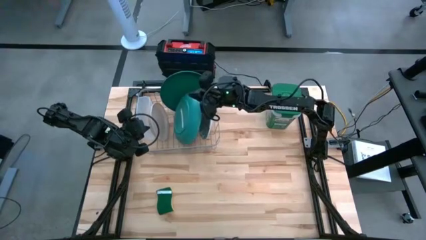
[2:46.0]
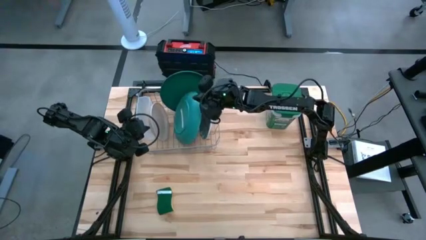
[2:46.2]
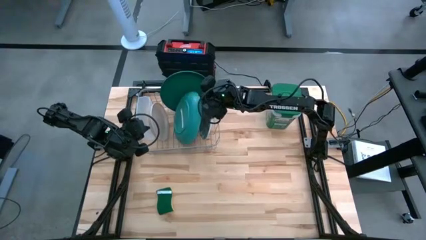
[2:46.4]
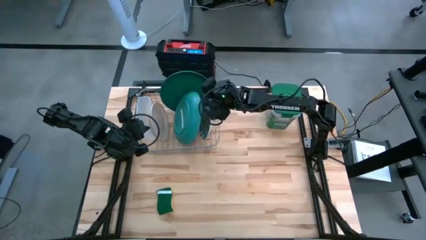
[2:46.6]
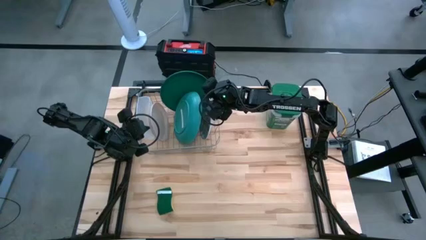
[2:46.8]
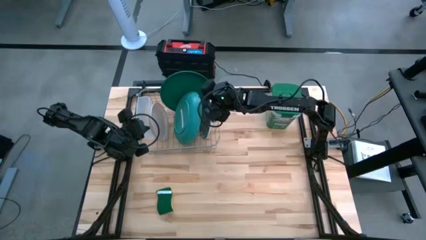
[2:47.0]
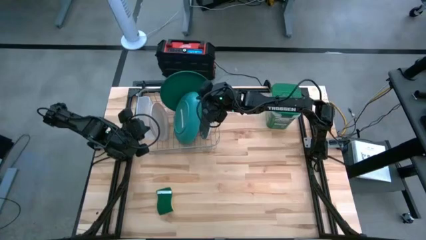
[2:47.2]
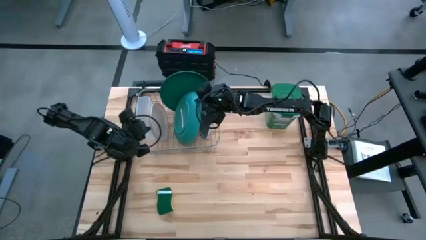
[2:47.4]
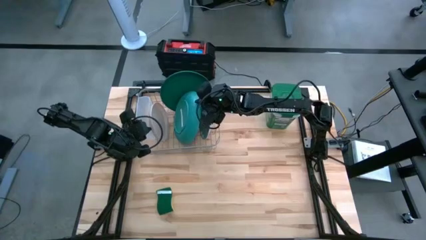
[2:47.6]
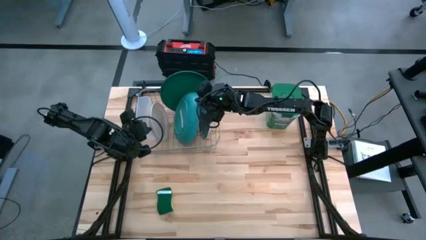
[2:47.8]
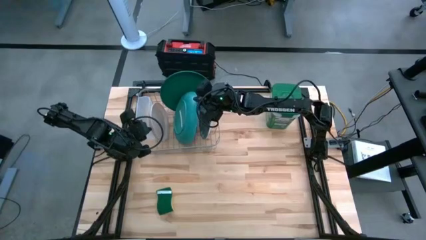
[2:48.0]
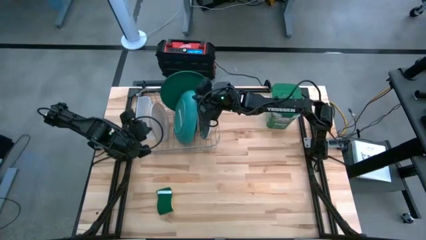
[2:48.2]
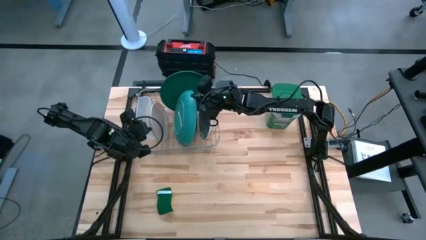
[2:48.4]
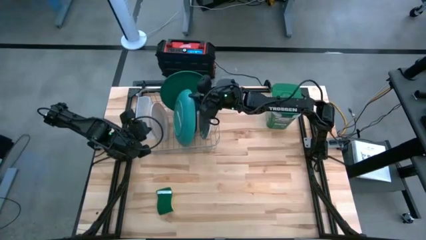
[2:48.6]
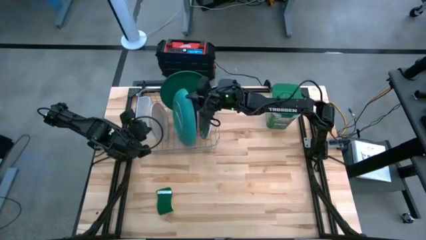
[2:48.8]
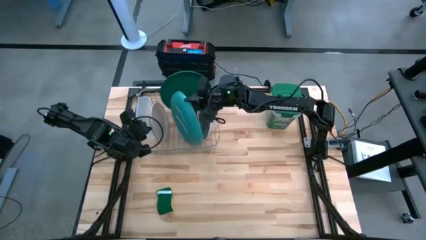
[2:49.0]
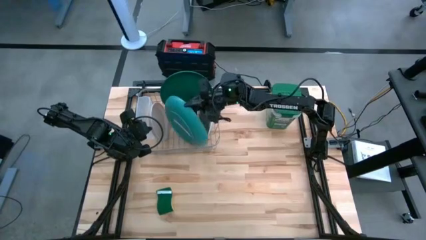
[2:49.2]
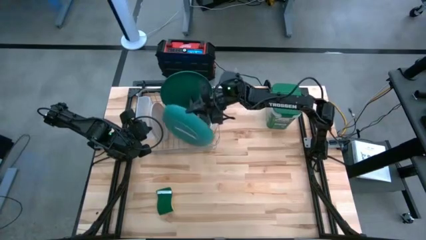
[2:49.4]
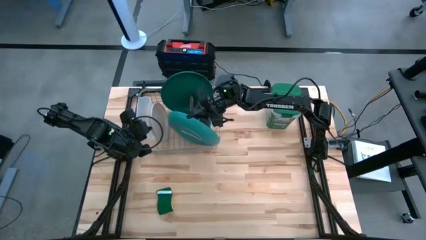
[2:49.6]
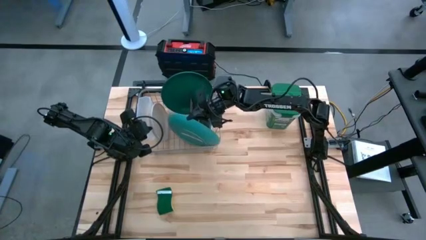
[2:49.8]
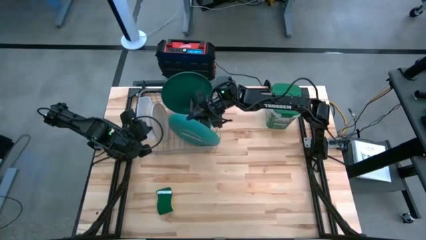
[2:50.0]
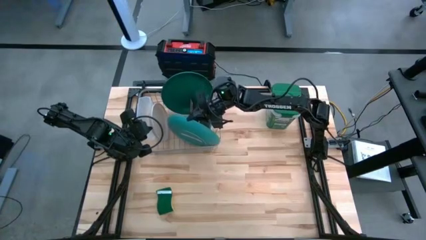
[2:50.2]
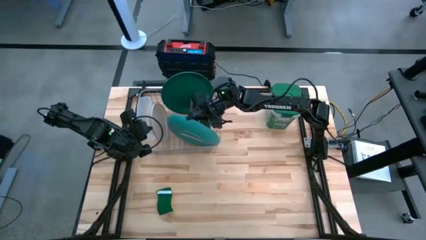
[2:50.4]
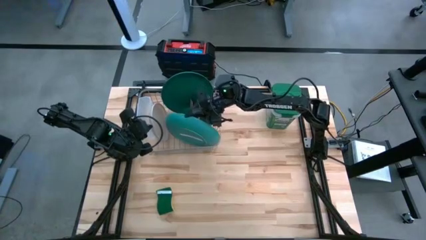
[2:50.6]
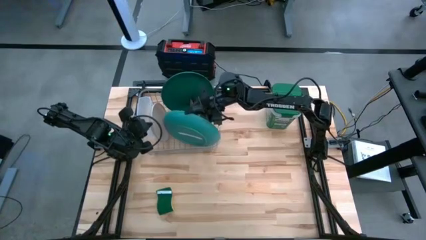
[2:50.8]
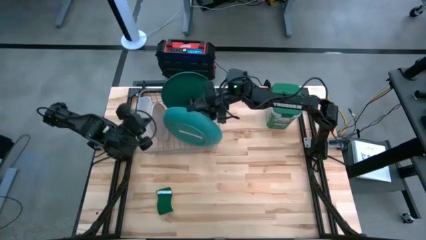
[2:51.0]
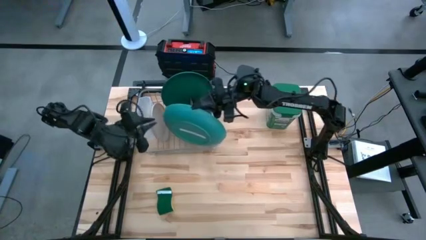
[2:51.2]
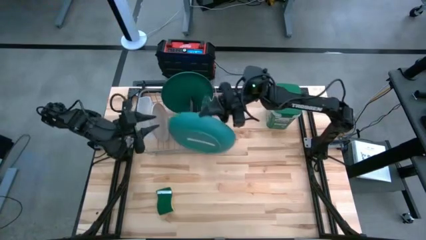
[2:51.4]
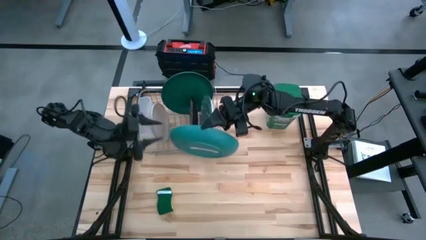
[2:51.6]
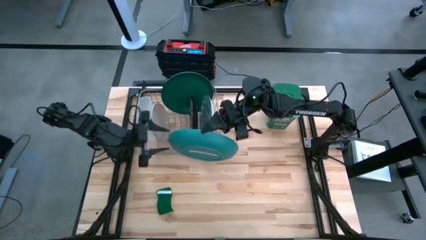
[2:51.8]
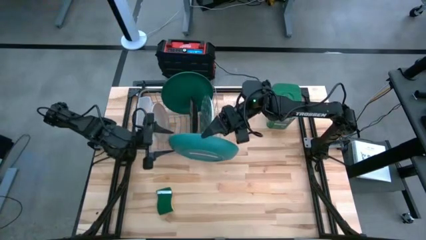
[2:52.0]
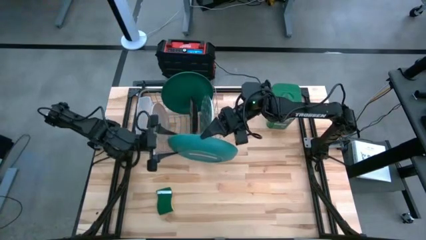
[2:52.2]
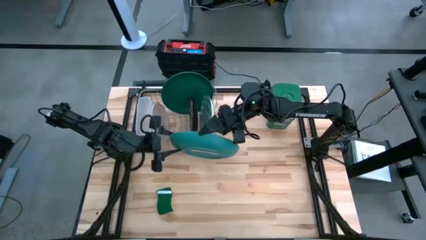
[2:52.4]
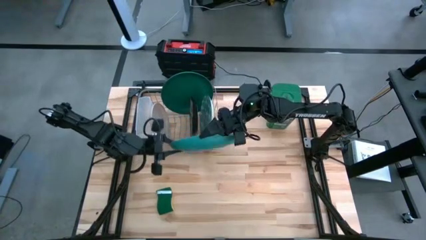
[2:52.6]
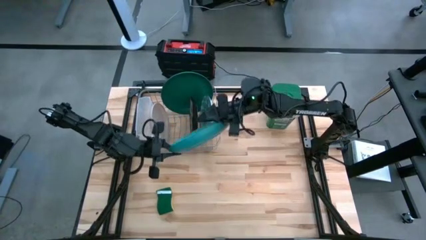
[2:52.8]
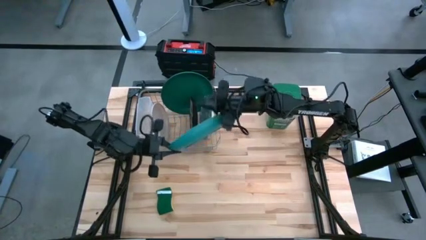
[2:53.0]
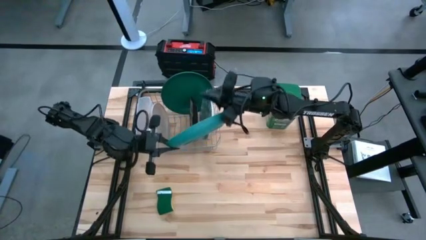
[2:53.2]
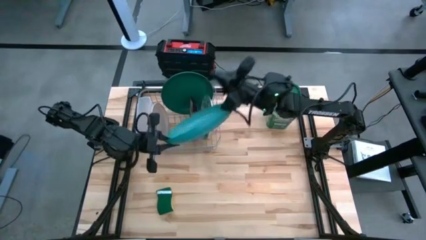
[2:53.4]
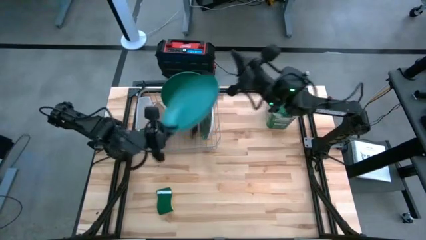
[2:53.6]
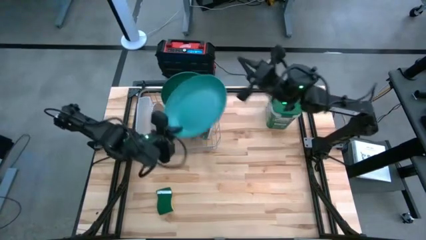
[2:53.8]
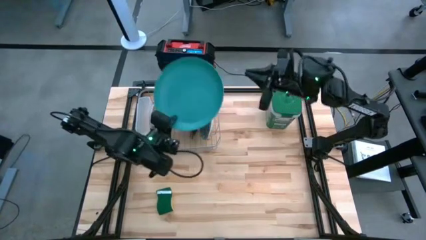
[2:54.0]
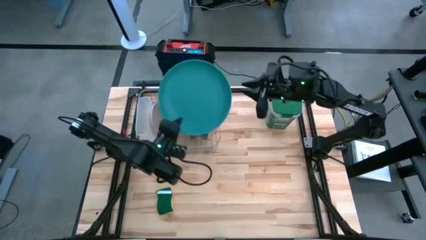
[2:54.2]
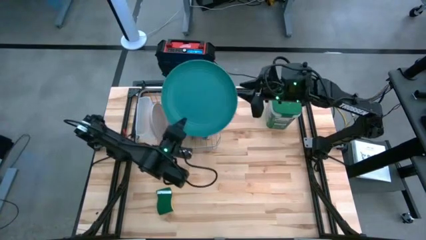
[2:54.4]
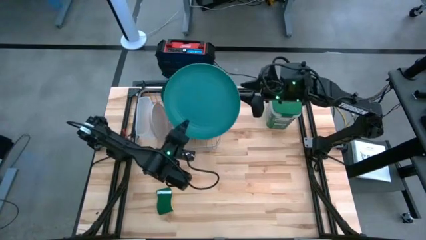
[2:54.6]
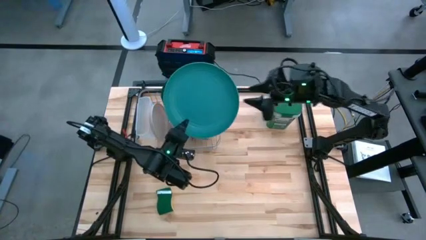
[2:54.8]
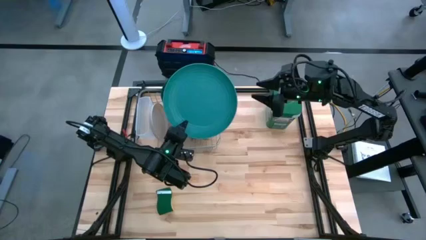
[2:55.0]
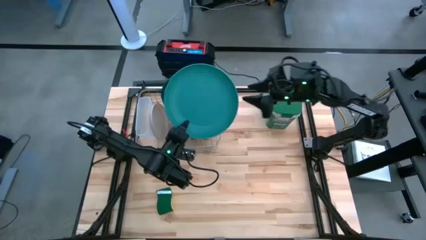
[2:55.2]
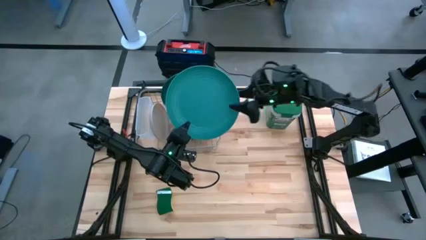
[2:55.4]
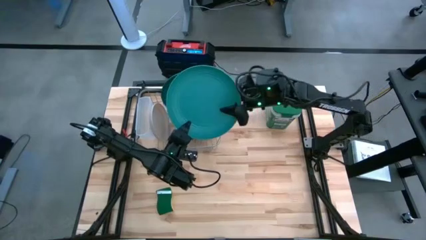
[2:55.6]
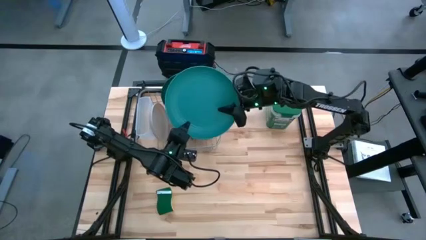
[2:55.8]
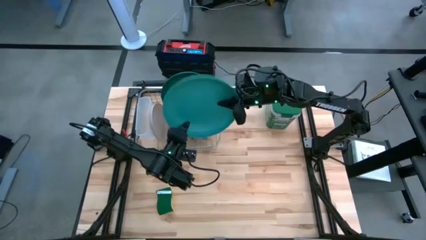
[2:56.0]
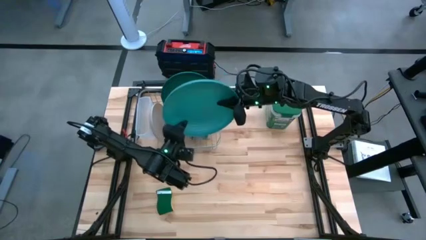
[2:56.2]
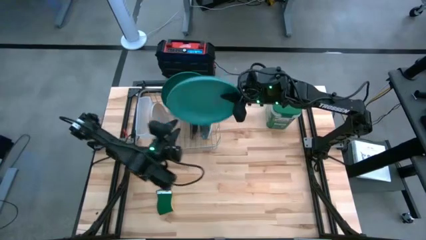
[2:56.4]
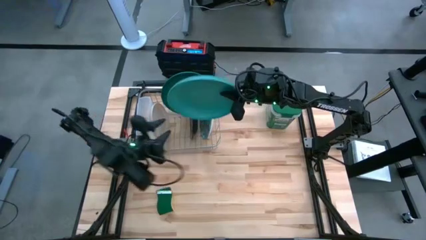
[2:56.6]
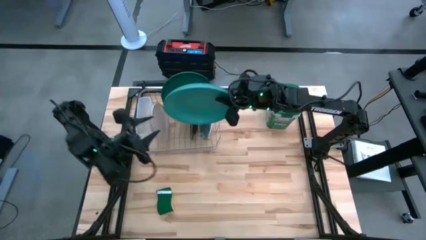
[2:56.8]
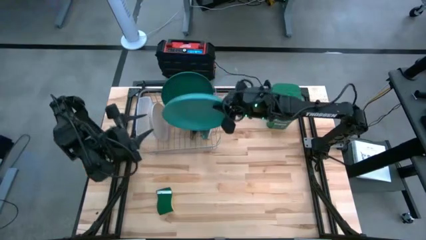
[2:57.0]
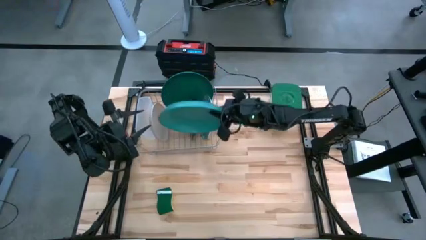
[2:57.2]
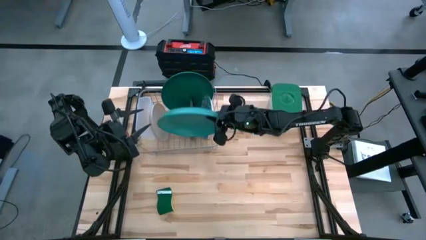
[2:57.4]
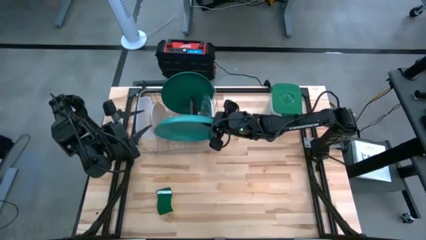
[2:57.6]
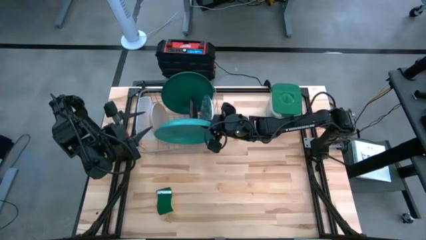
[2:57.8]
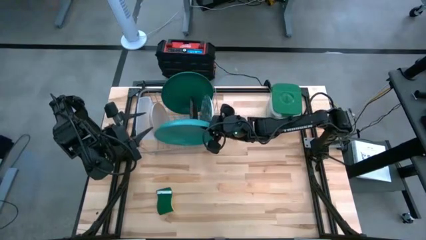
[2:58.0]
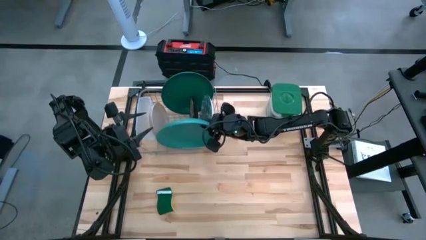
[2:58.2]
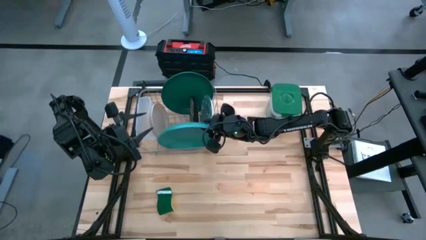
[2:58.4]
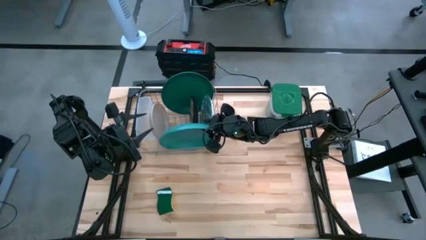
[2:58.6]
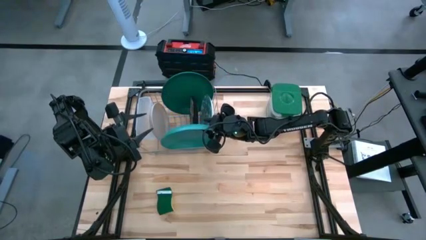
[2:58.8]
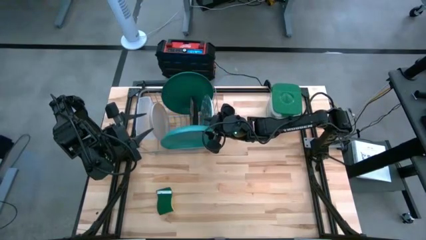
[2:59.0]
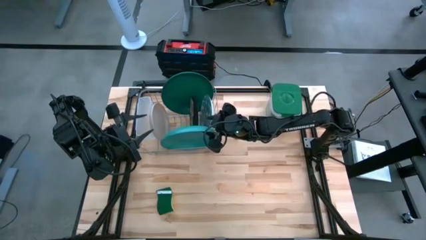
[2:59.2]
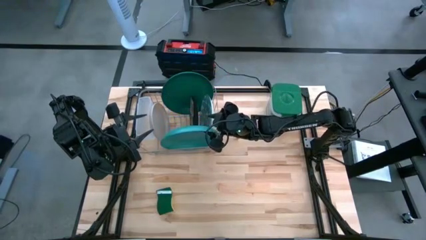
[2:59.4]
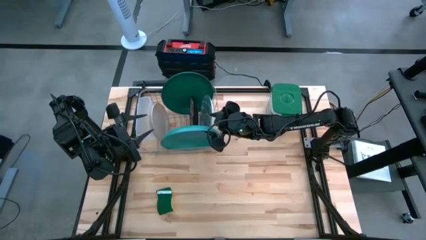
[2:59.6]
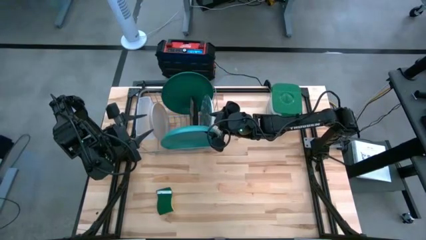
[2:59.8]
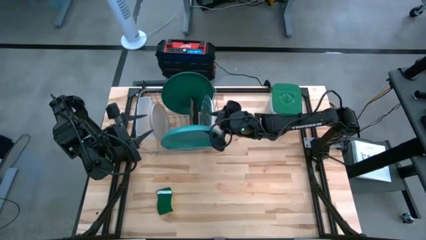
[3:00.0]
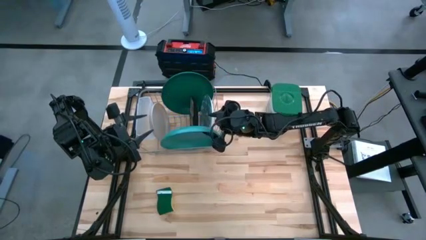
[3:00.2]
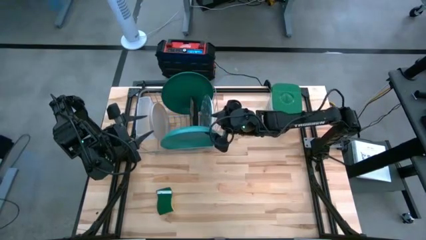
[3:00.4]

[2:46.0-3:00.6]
Task: Sort dishes
Put the light blue plate on the dish rack

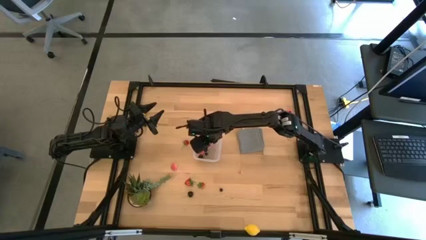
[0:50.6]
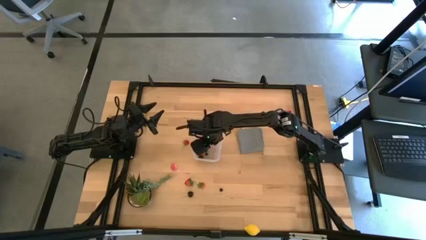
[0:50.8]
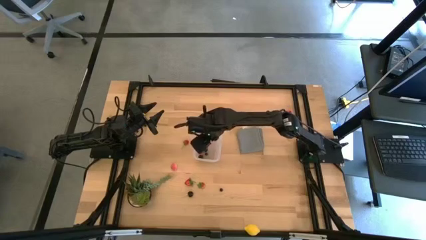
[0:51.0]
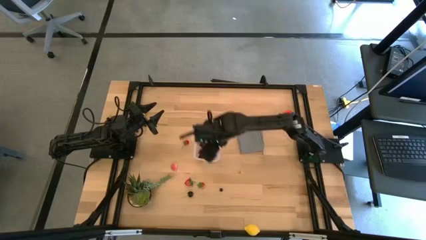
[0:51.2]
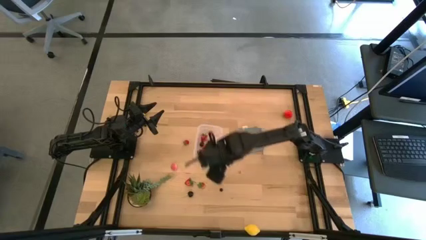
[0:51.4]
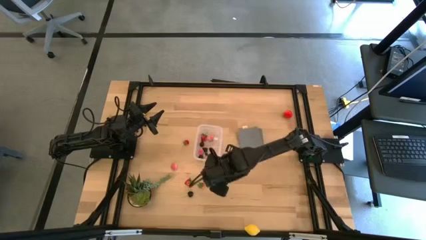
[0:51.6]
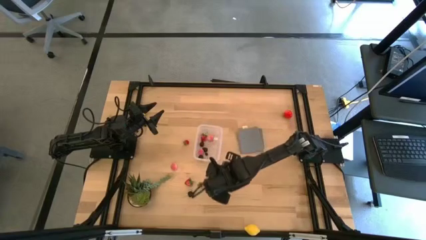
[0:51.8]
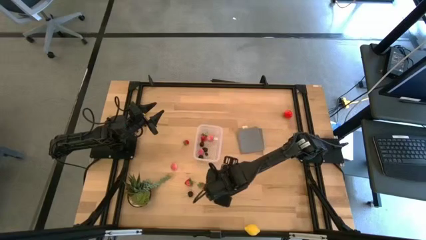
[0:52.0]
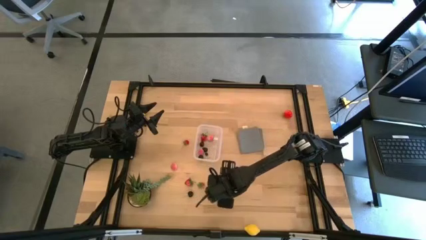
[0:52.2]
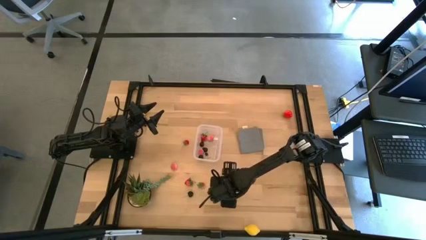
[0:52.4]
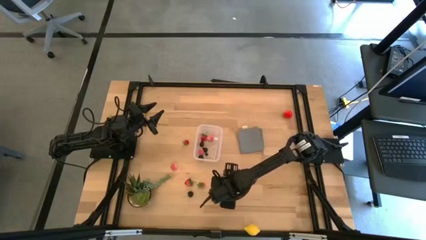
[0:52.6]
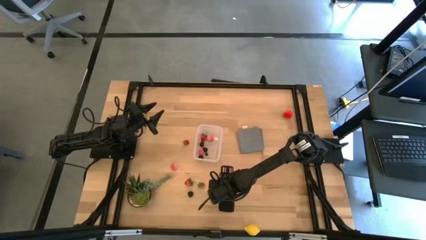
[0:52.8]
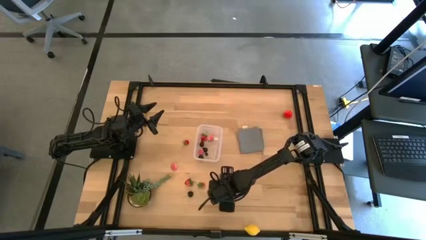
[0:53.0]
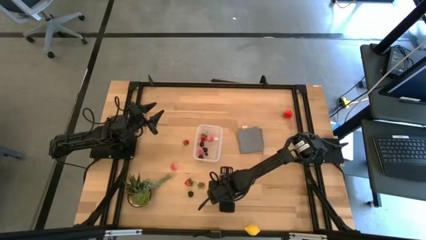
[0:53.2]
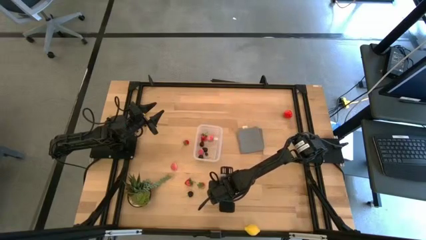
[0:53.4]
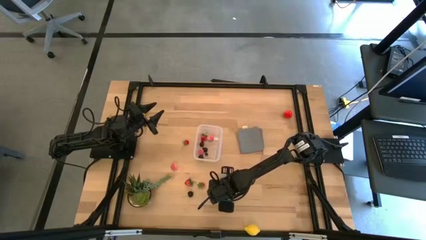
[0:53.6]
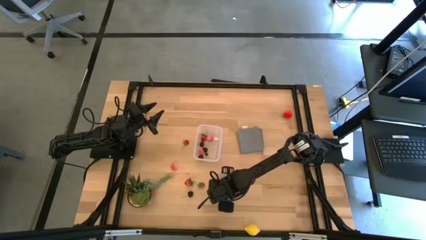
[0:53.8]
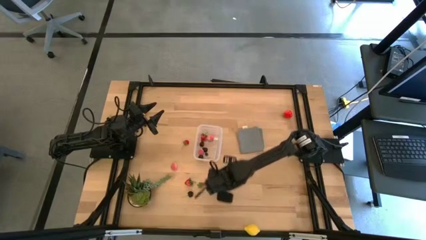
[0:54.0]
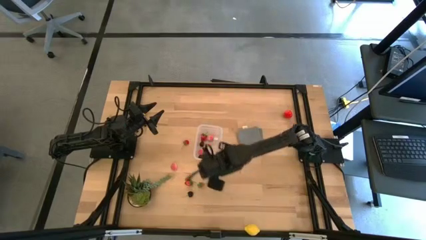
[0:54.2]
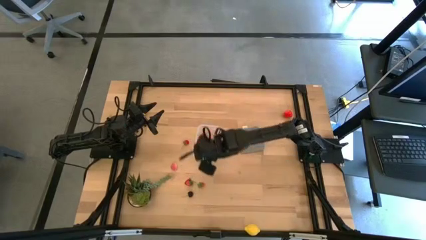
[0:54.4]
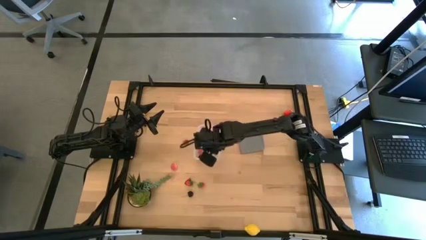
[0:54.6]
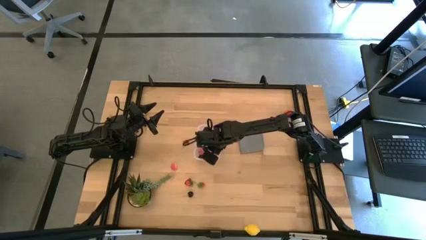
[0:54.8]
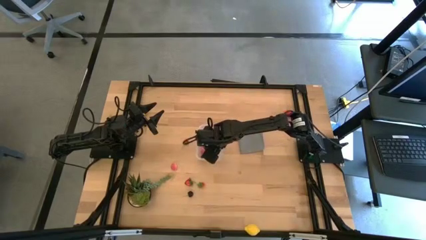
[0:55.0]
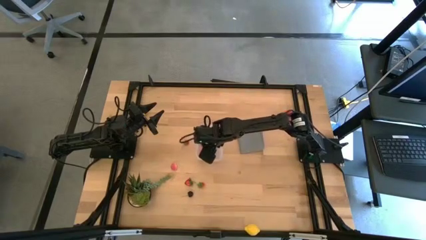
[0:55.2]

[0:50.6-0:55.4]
Task: Pick and placing Produce into tupperware
Put the blueberry into the transparent bin
